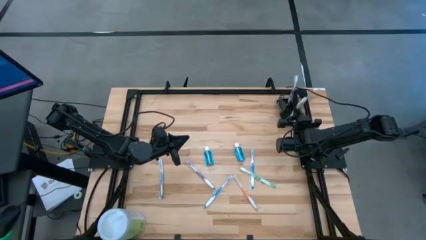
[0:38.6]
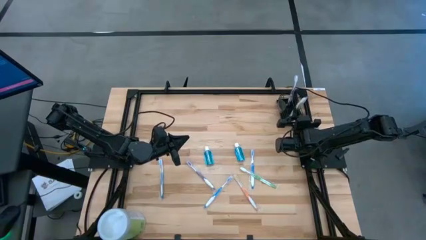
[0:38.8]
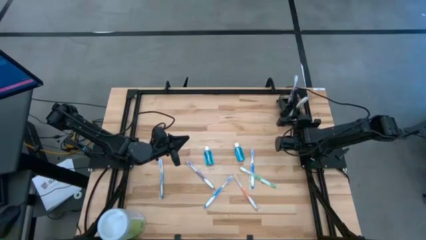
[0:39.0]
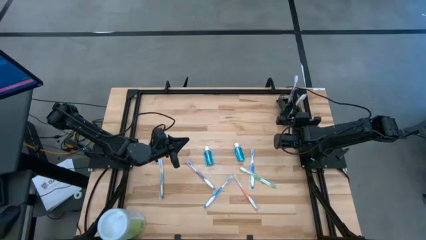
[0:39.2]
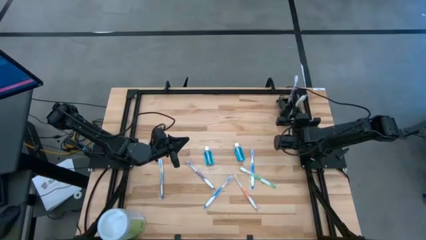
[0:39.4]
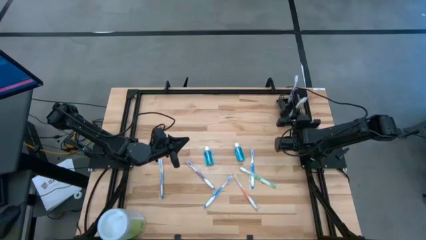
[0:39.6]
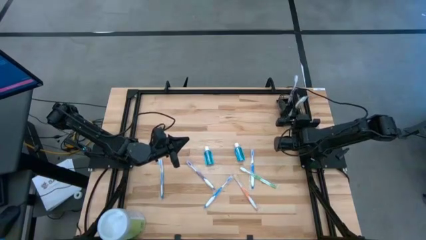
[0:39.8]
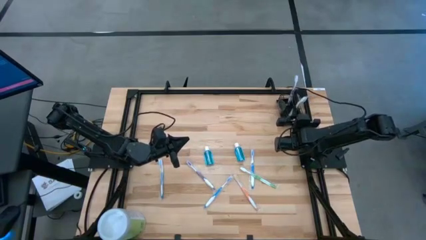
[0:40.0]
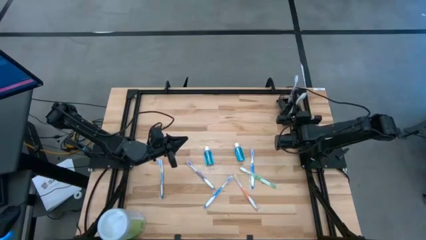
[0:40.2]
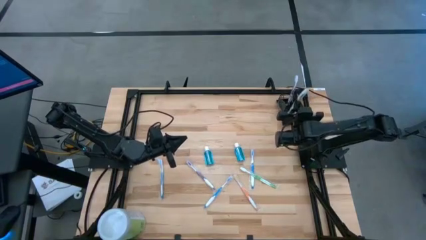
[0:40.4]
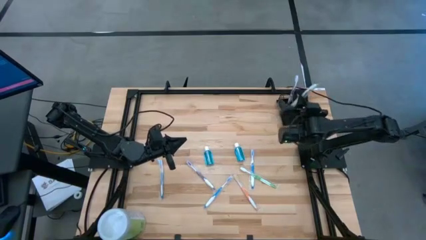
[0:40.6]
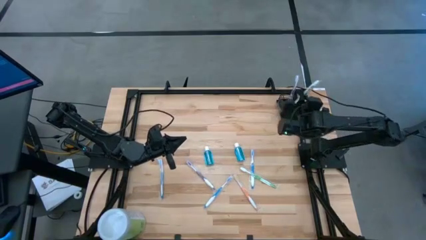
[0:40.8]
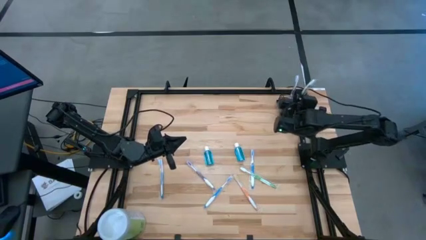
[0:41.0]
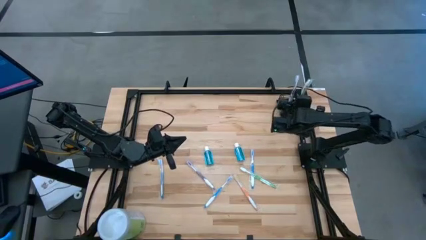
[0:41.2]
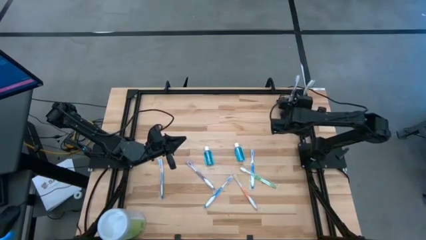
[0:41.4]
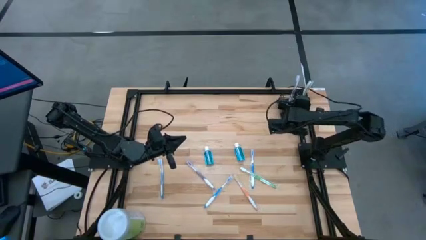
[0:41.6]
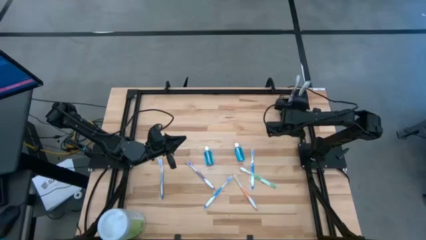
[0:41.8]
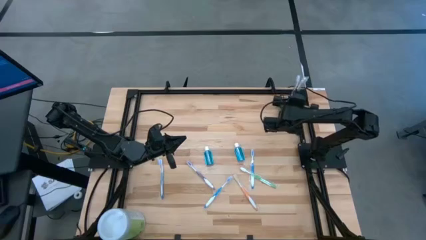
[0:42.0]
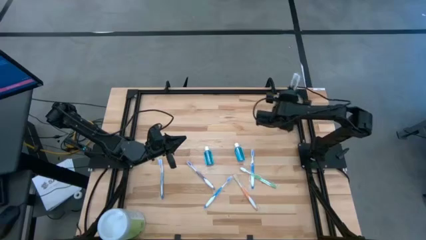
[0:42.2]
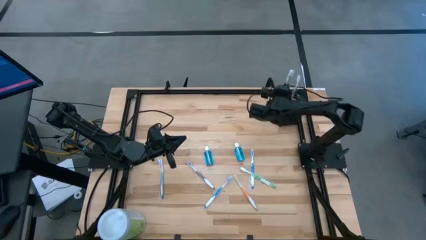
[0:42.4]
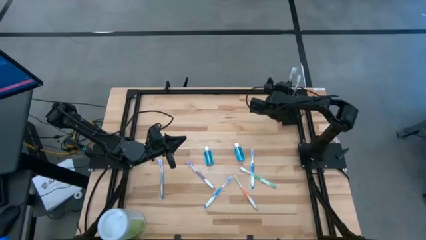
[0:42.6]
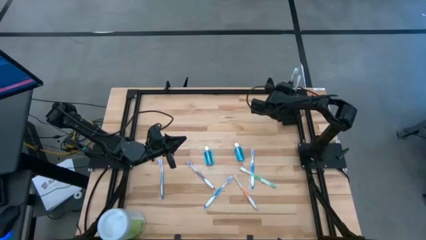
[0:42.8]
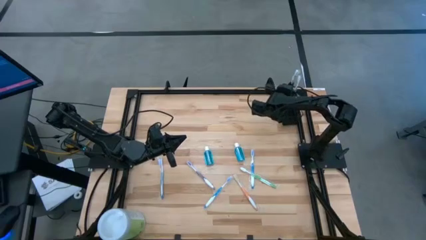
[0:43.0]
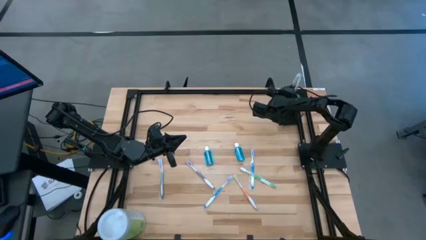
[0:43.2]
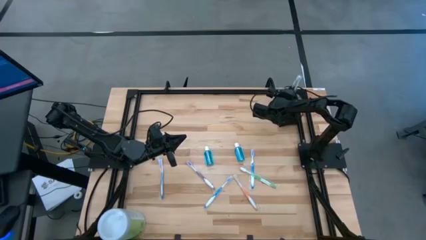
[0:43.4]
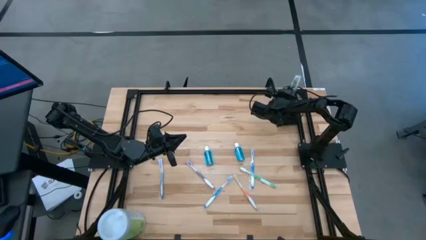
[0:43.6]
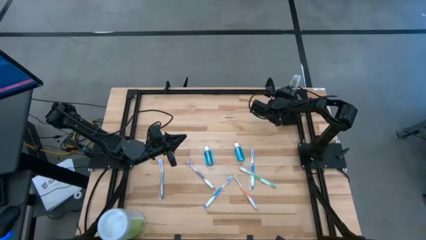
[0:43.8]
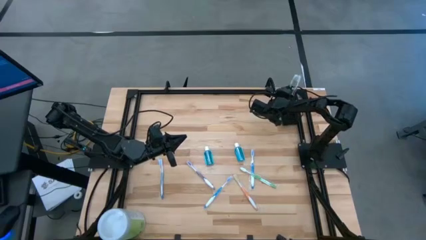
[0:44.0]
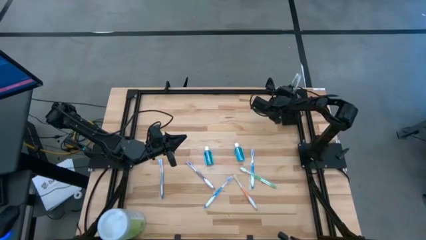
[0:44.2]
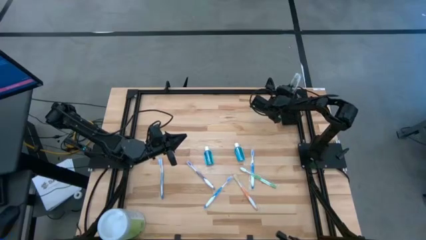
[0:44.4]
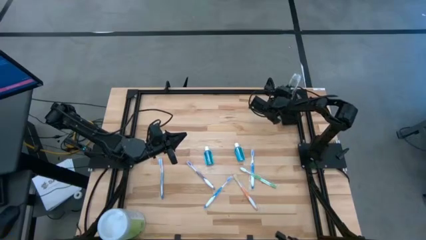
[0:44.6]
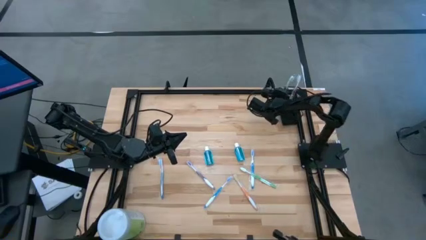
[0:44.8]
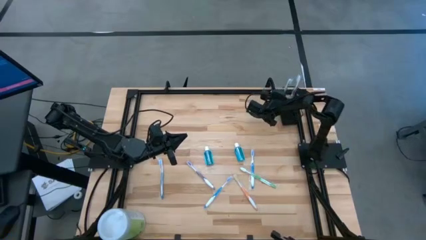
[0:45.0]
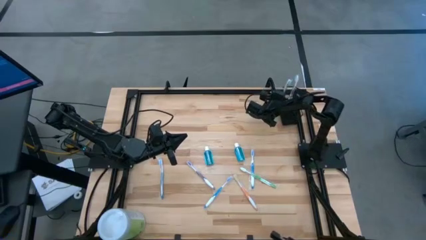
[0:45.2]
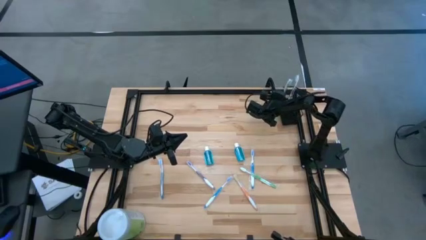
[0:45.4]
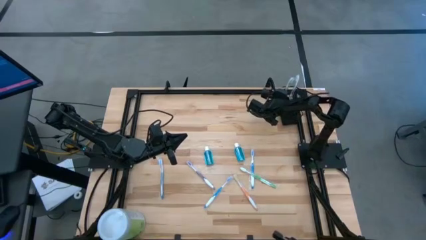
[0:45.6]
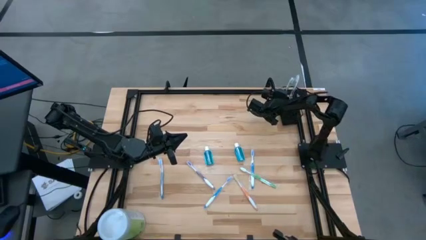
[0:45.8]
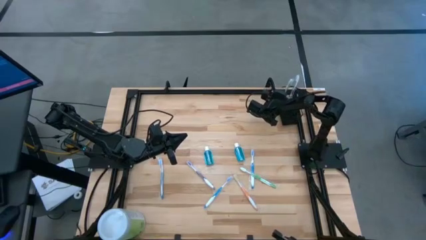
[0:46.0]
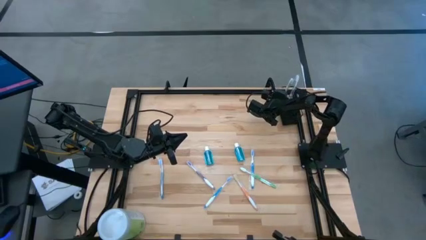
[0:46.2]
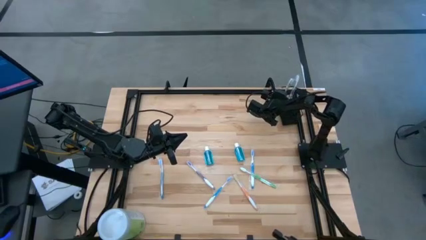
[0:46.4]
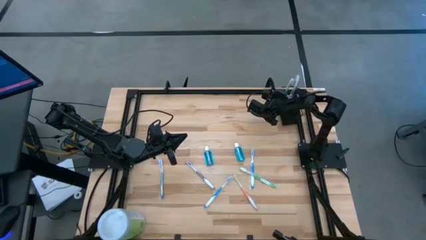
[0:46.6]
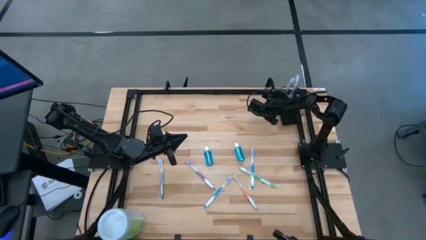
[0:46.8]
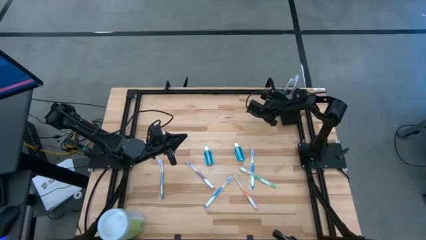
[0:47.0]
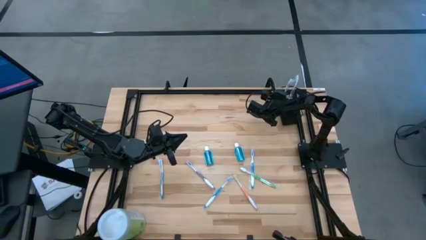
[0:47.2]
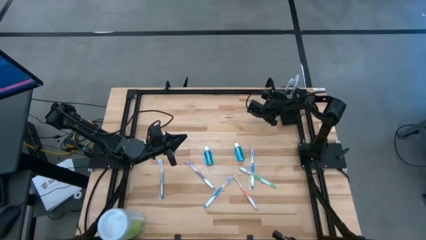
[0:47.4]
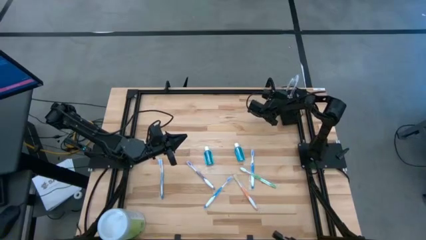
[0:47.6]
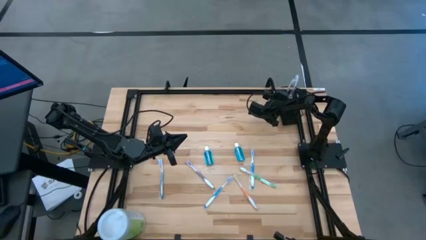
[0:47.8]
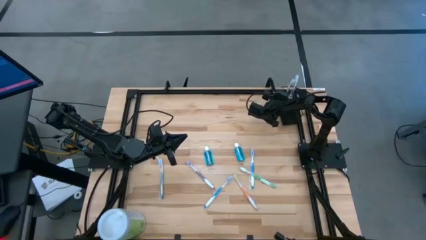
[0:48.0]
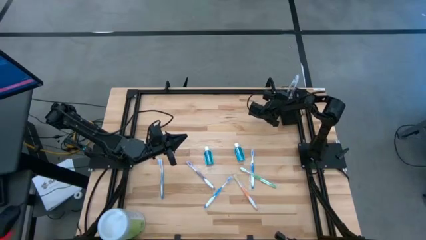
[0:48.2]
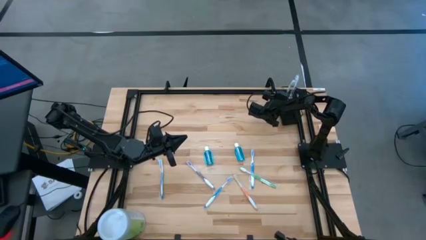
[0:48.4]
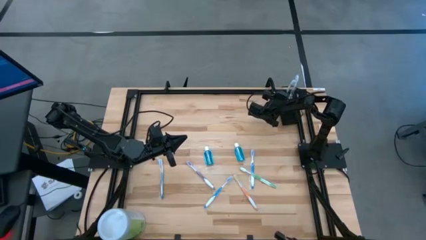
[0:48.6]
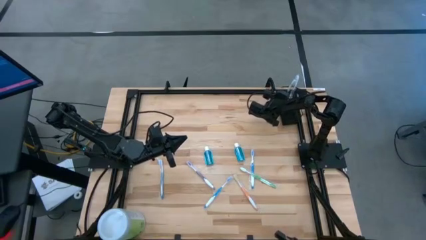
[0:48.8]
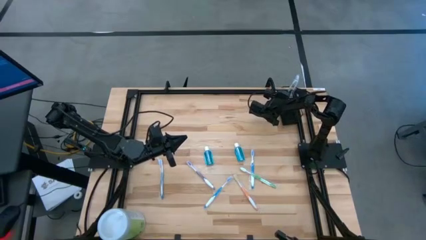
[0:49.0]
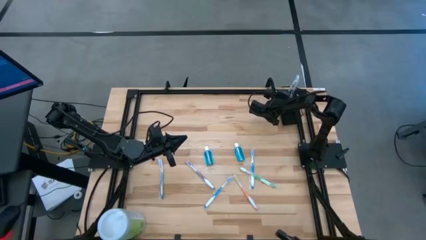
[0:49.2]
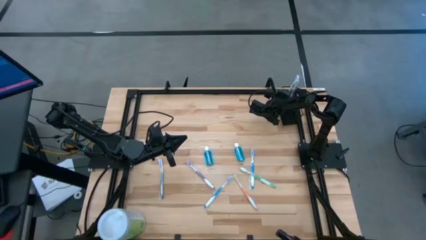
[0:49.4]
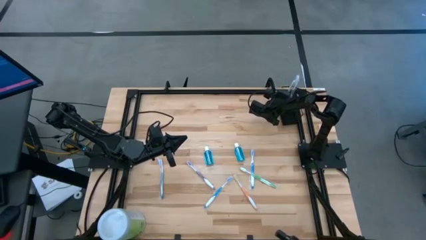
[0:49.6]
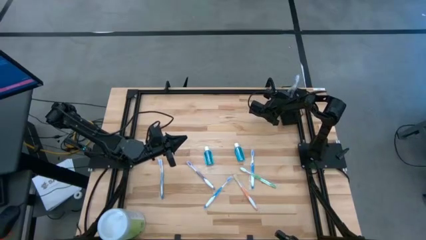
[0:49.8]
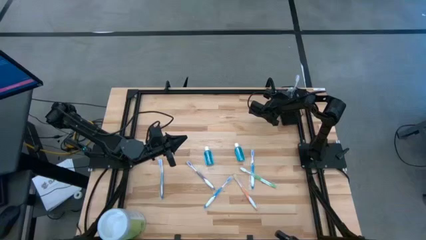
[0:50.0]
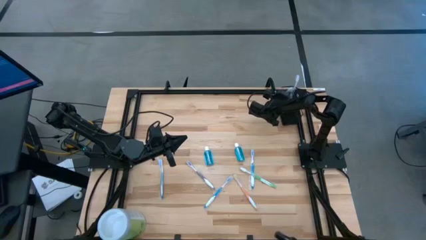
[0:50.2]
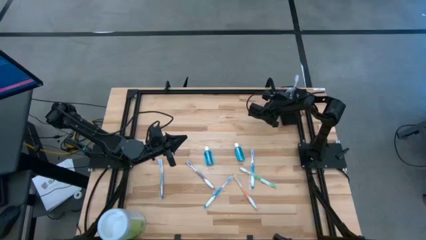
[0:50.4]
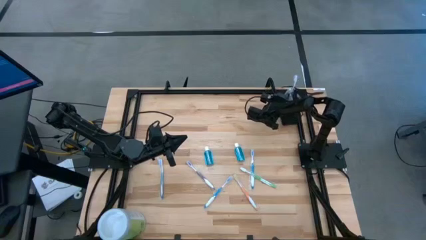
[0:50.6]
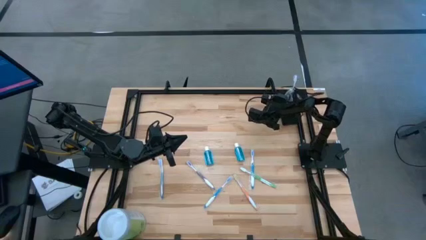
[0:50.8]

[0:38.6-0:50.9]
Task: Pick & Place toothbrushing station
Put the top green toothbrush into the left section of wire organizer

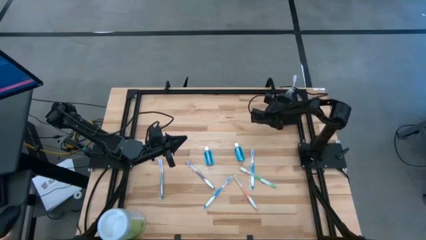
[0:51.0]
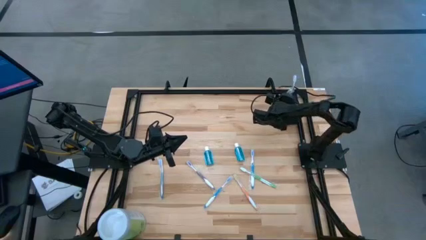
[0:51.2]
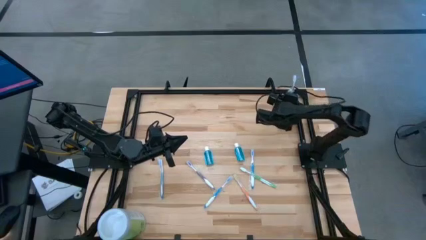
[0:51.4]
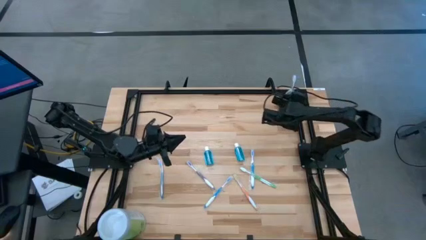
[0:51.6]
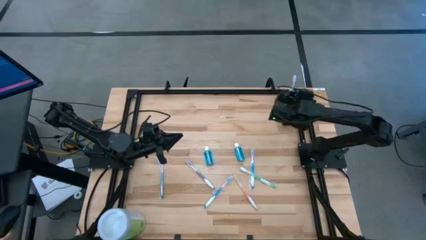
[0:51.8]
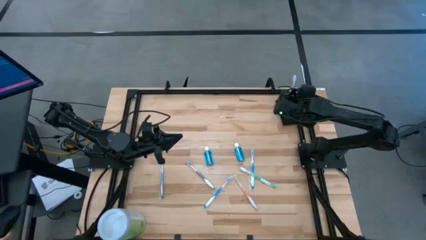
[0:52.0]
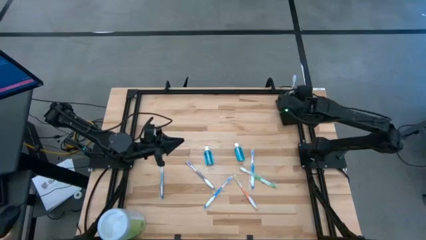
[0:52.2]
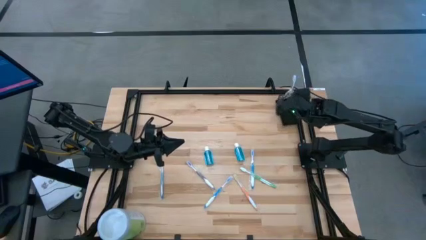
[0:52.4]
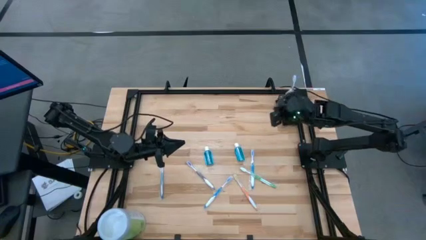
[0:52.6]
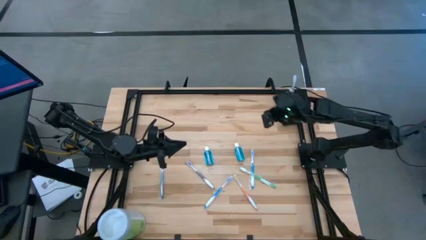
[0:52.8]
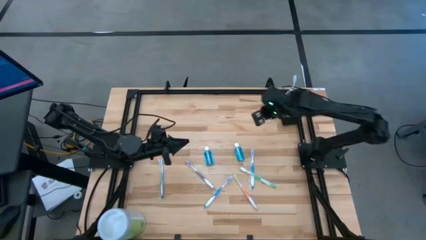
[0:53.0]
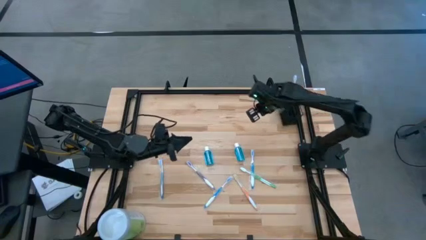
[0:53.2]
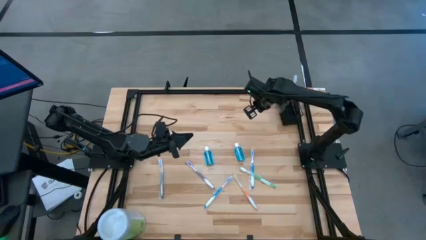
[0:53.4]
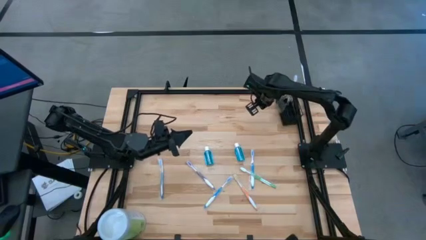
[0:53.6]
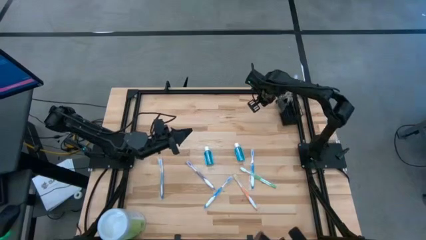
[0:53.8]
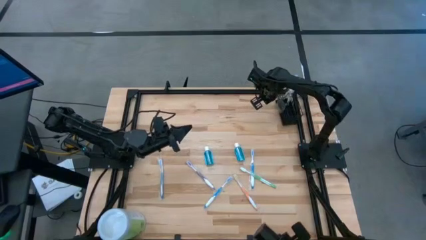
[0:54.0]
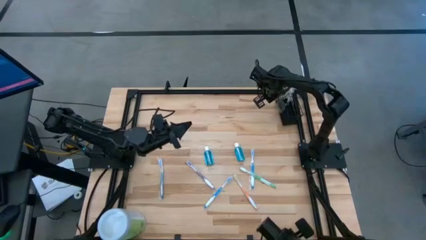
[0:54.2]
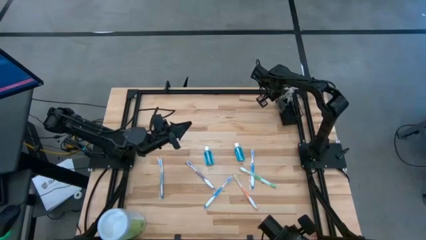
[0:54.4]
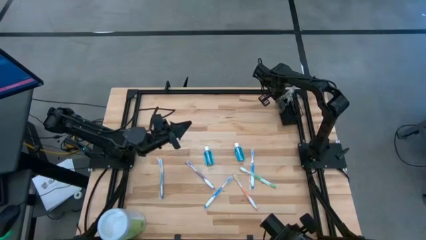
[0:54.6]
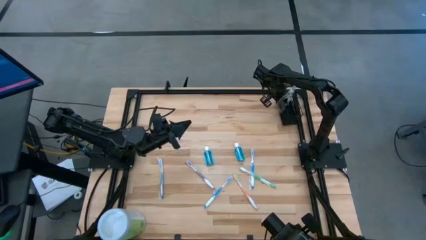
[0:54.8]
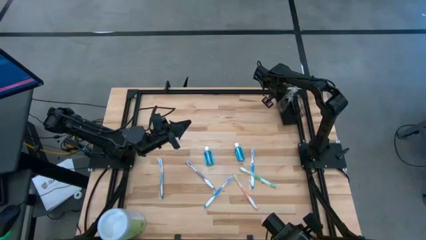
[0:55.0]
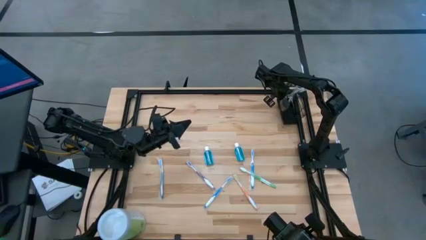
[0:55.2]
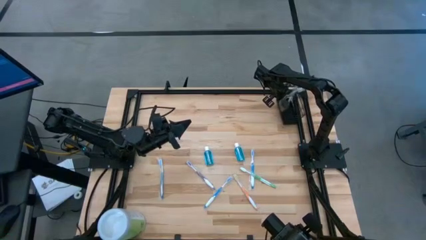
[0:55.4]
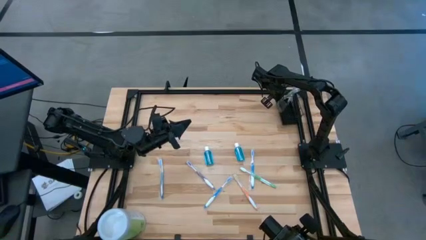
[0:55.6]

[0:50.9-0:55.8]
Adjust the wire organizer
